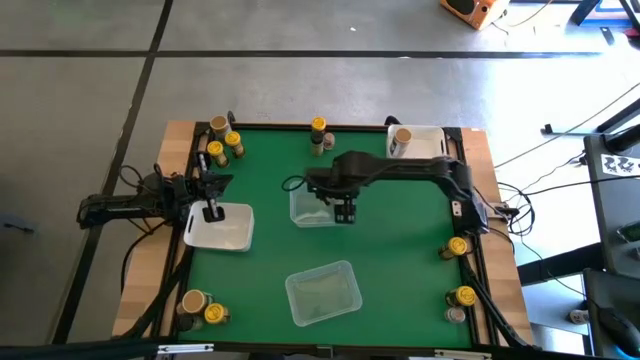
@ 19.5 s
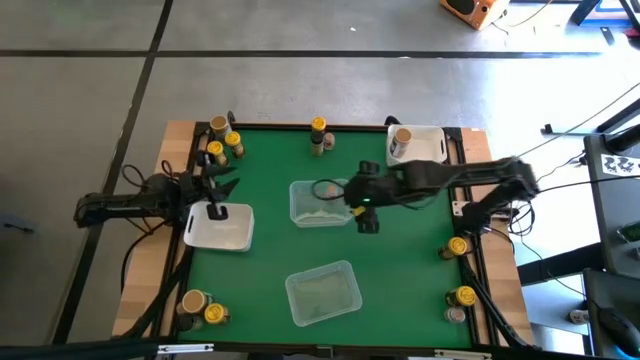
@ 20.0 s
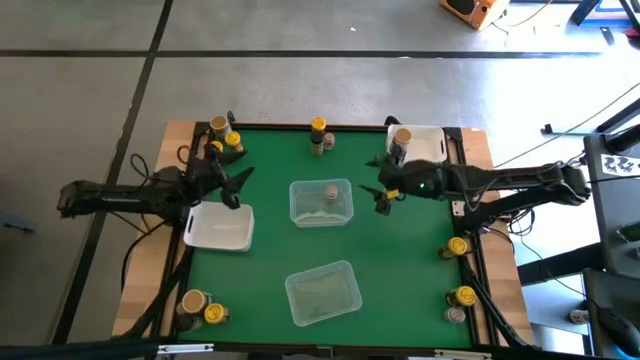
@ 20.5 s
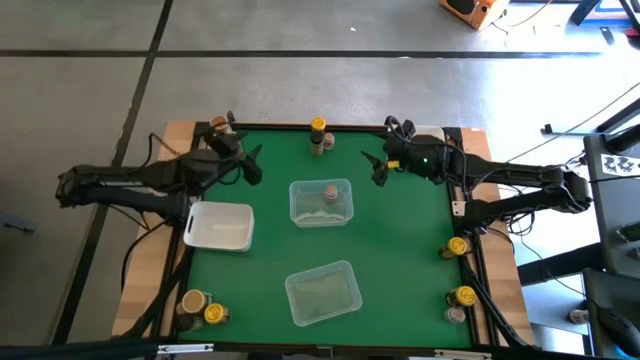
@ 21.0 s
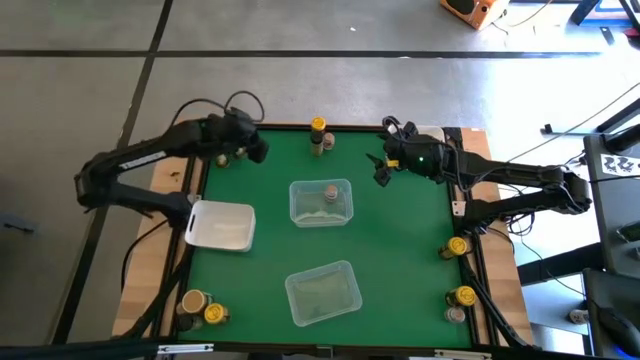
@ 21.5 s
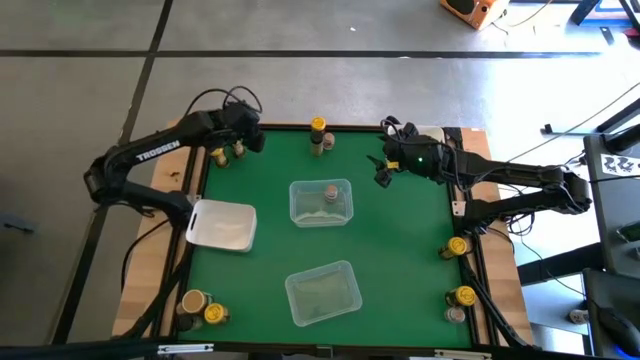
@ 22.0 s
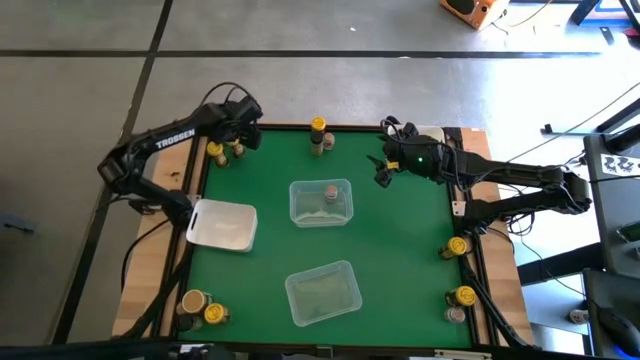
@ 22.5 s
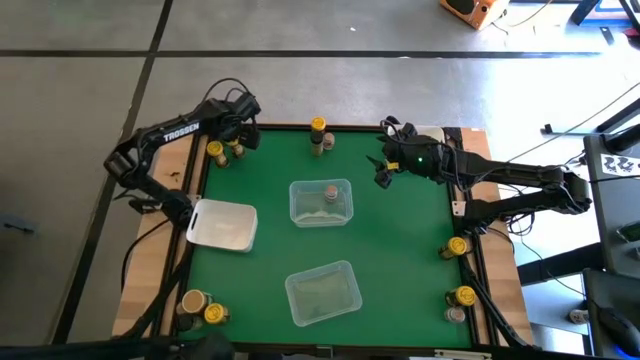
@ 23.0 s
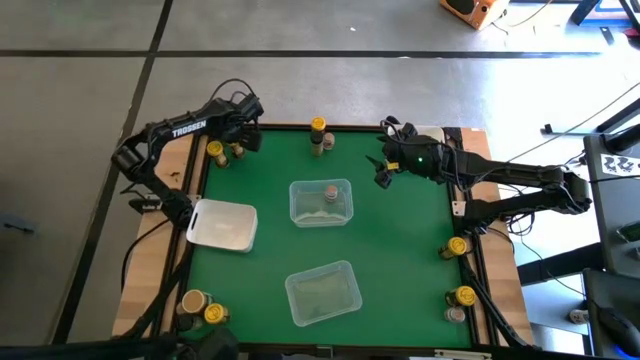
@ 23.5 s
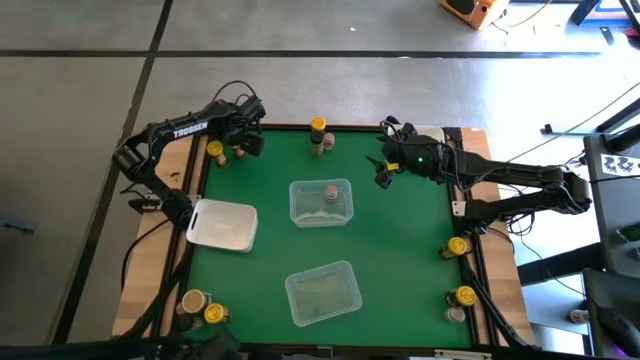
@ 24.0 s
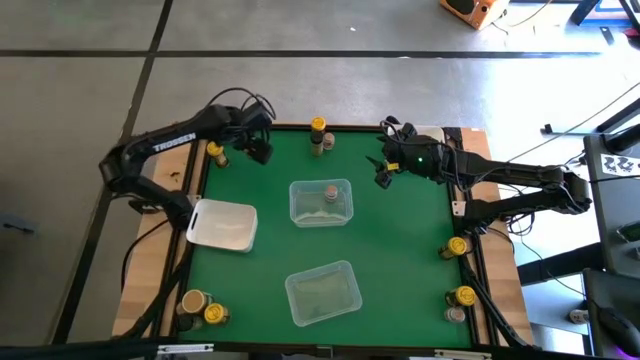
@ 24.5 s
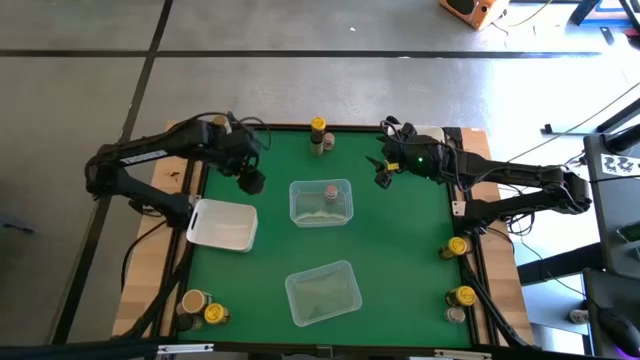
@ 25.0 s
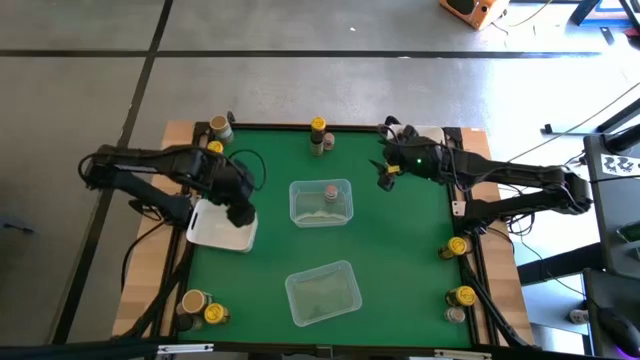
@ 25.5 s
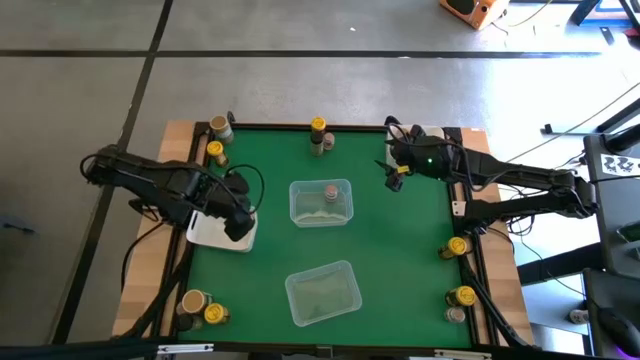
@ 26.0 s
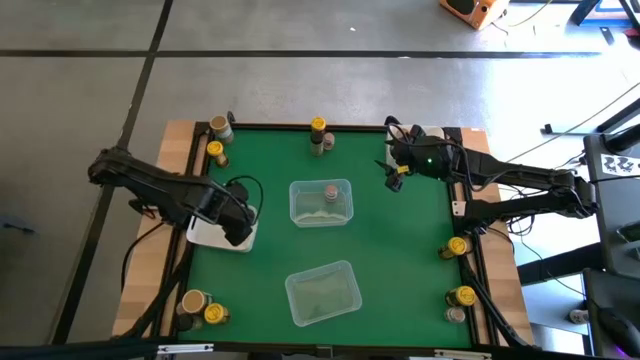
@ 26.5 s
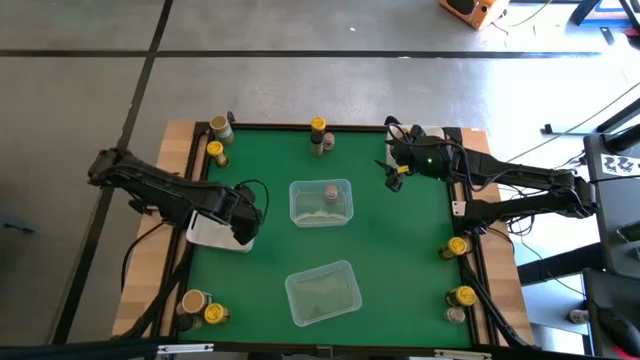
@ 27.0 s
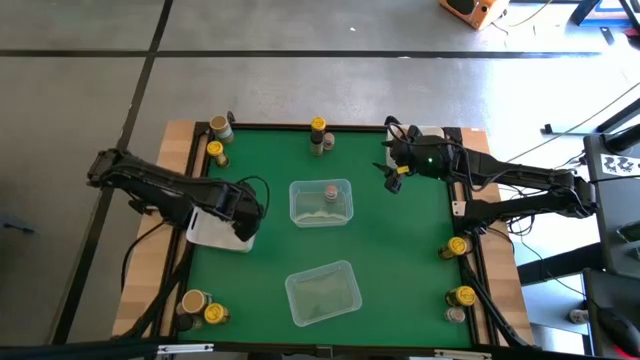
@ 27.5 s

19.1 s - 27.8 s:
Task: Sort spices by type
Put the yellow spice can into the bottom white bin

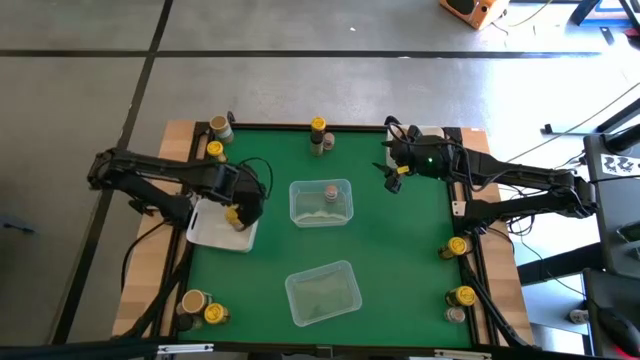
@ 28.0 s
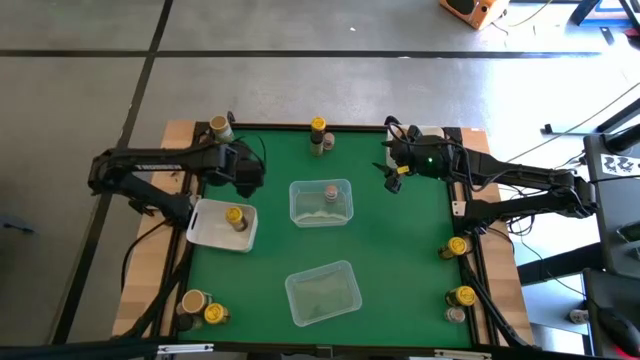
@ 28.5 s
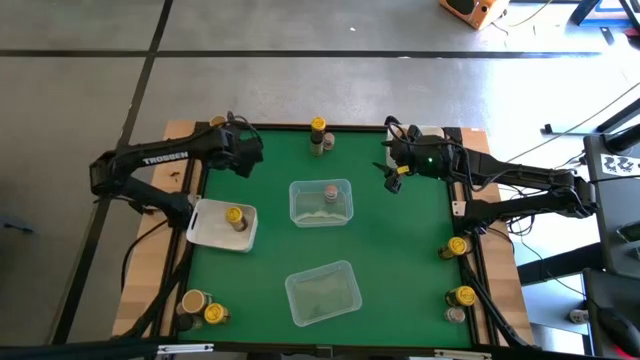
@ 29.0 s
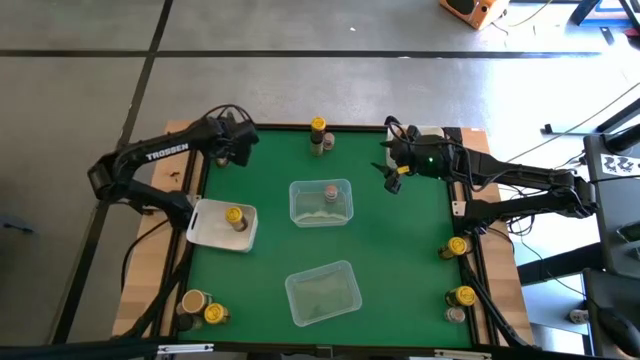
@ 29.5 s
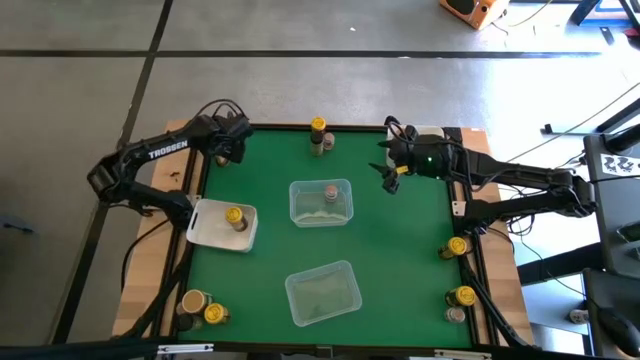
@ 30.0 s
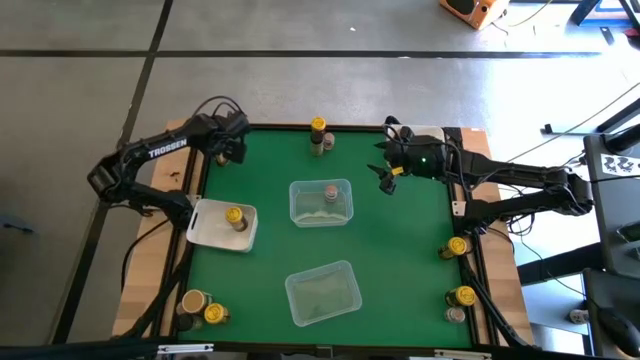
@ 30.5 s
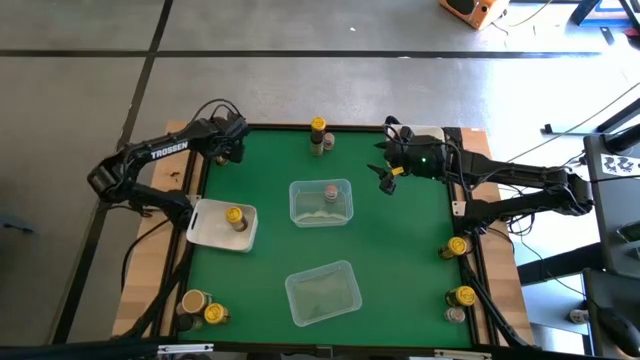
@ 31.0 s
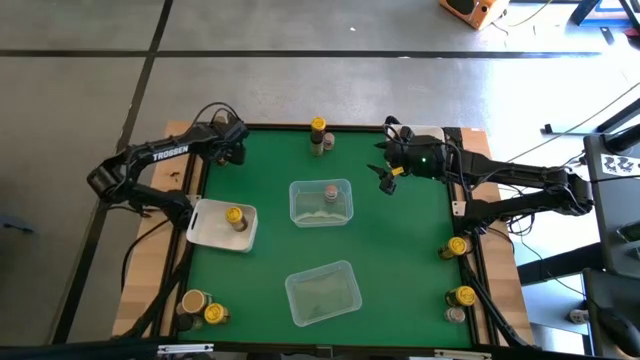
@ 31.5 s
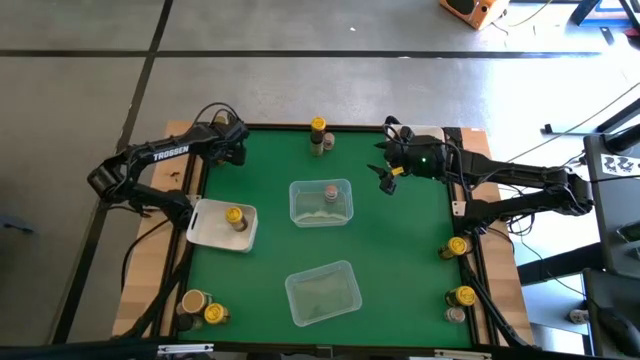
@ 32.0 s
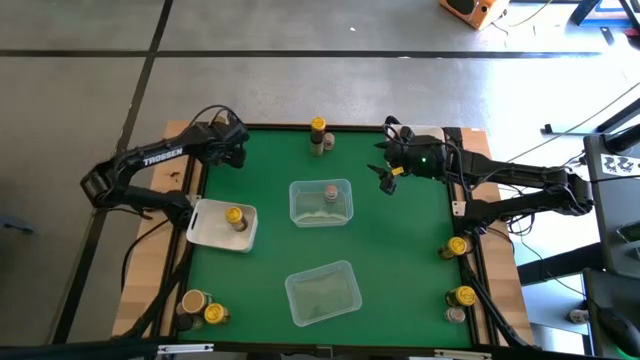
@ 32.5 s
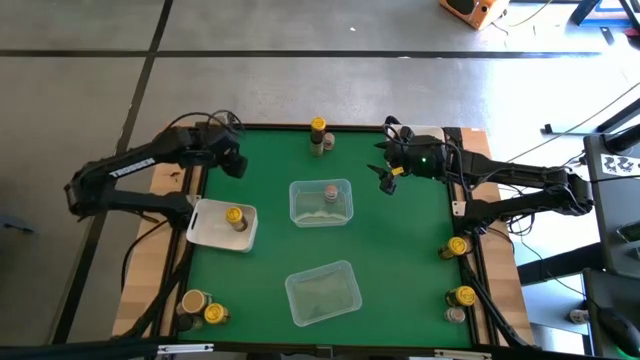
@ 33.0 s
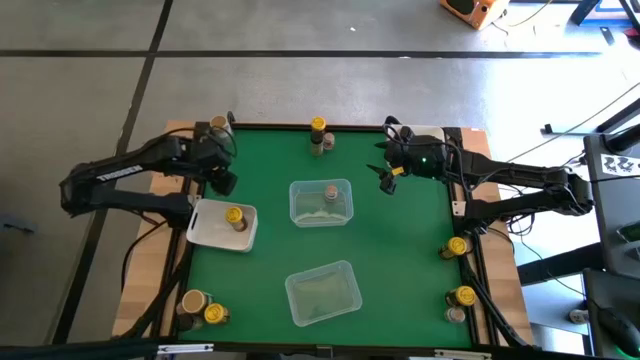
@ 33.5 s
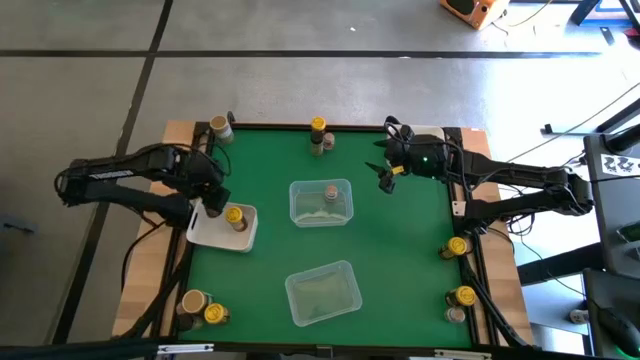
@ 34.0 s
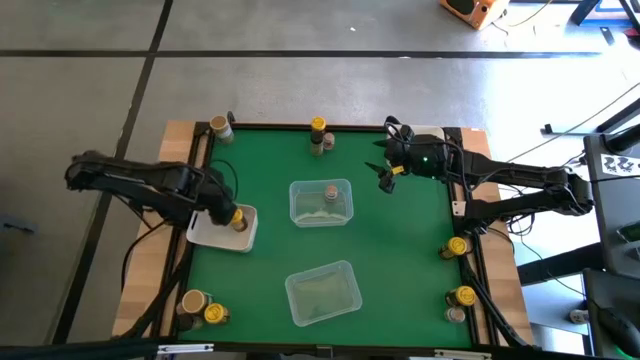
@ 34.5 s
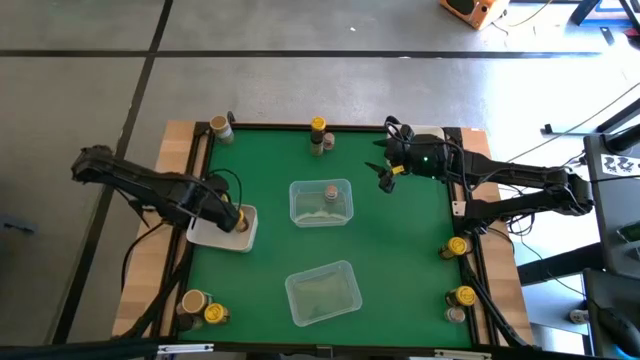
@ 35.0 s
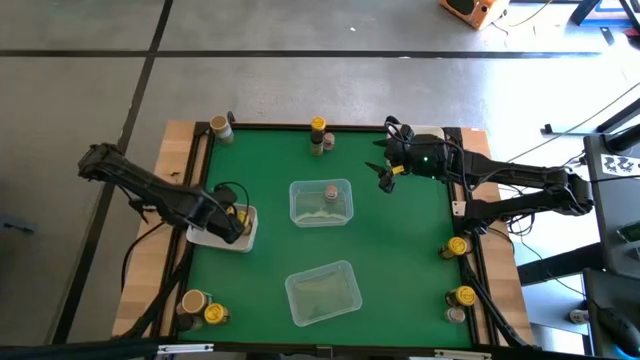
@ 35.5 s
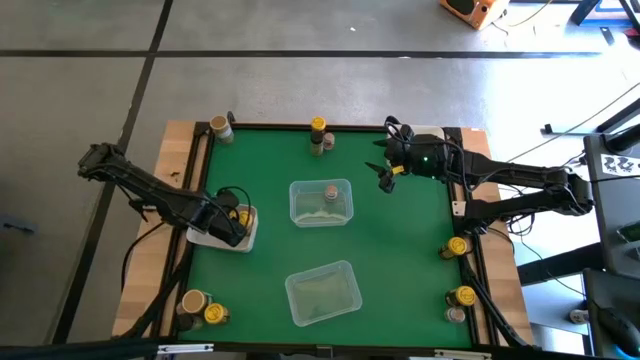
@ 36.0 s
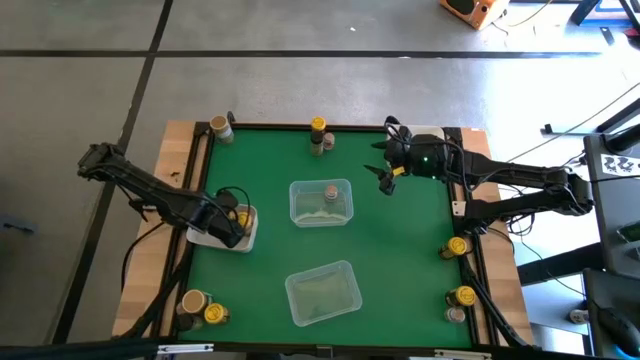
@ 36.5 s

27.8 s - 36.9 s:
Put the yellow spice can into the bottom white bin

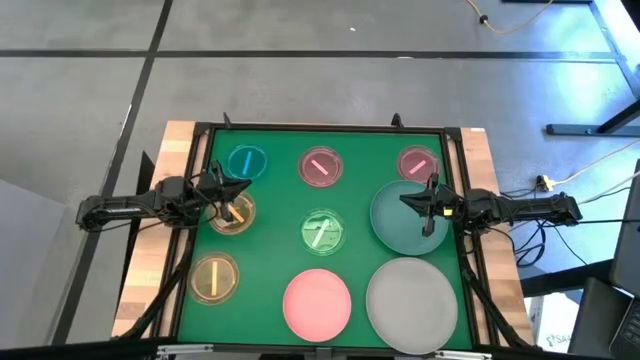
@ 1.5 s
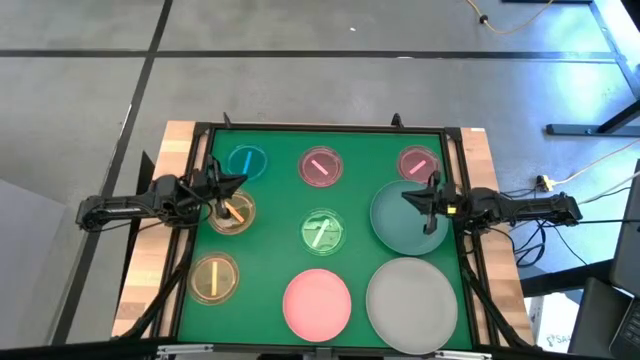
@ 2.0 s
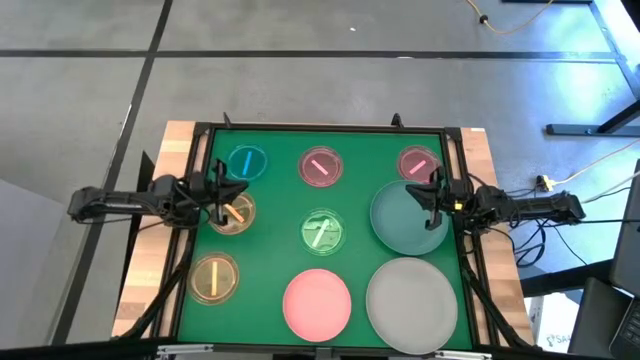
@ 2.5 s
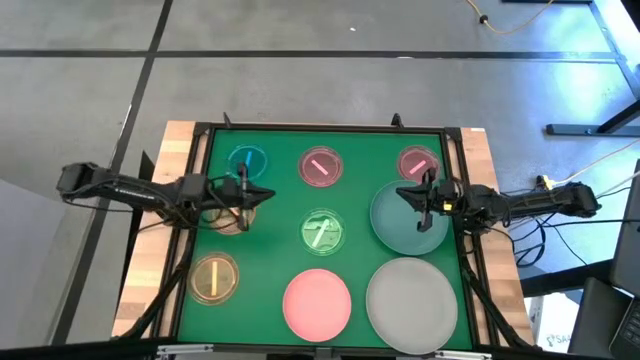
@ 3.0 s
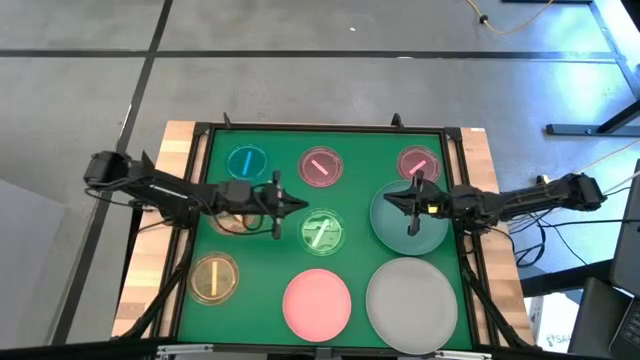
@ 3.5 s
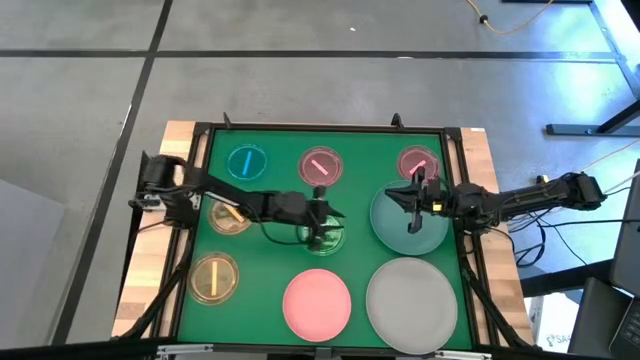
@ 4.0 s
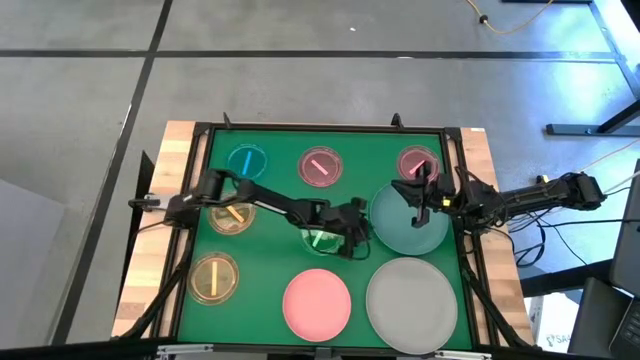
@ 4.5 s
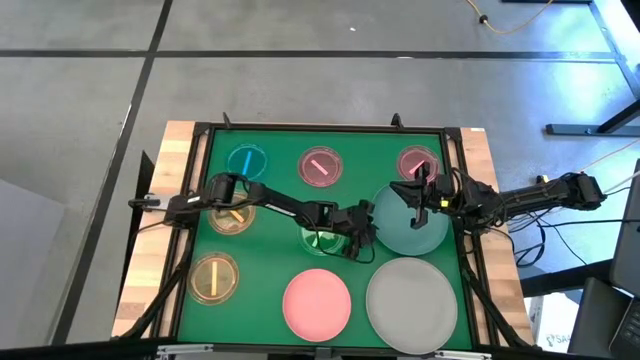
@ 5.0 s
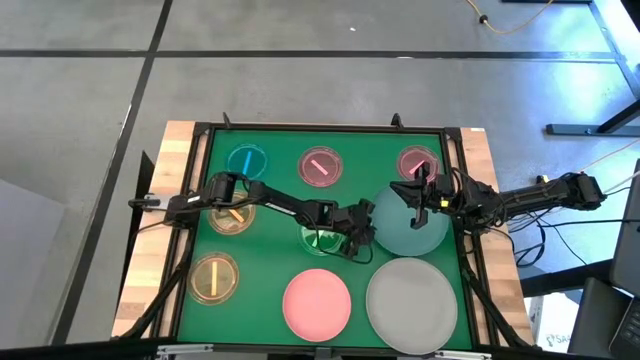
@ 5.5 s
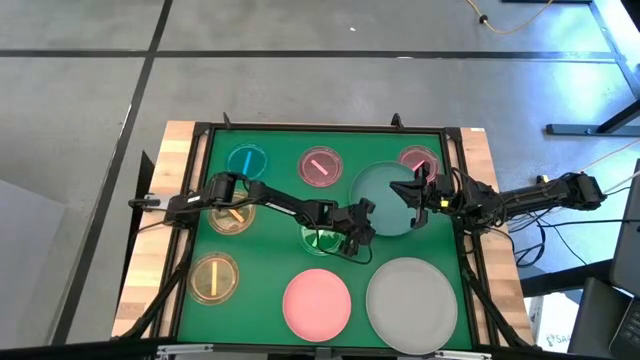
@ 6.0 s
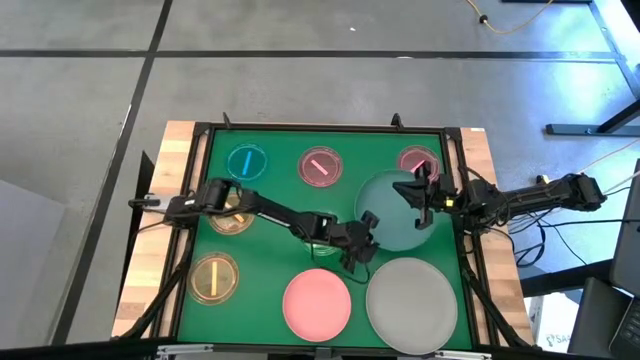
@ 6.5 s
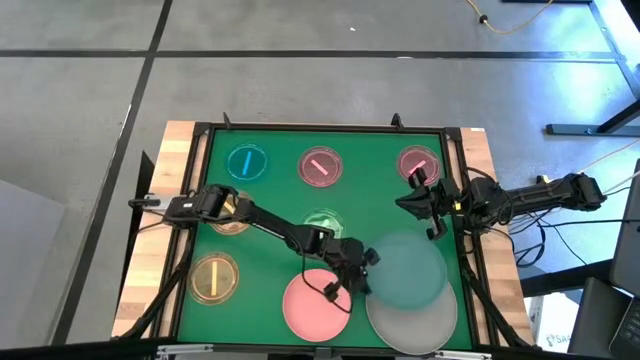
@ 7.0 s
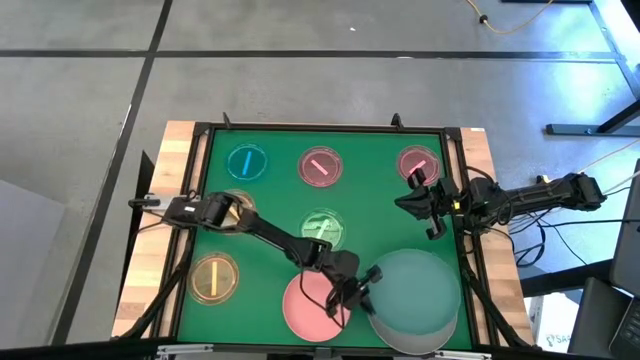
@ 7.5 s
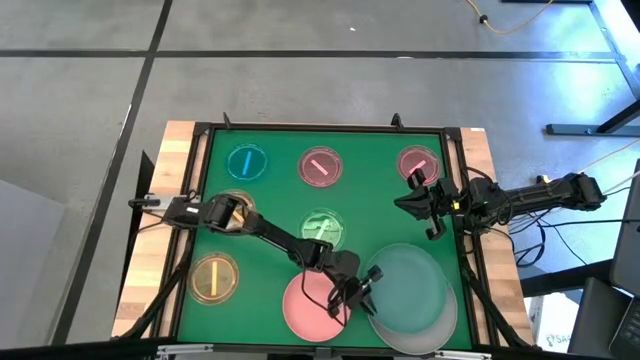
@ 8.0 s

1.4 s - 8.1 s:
Task: Stack plastic plates
Stack the blue plate on top of the gray plate
